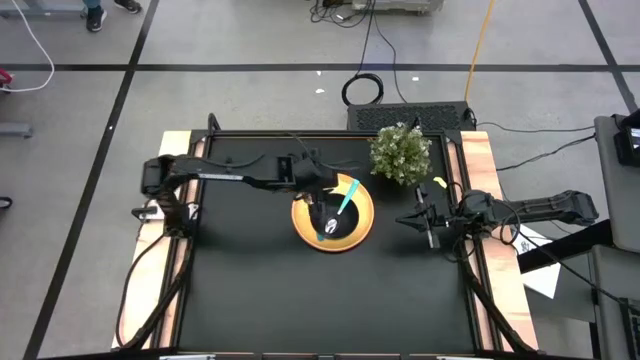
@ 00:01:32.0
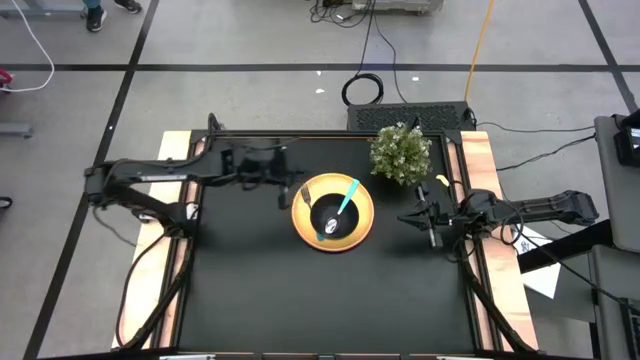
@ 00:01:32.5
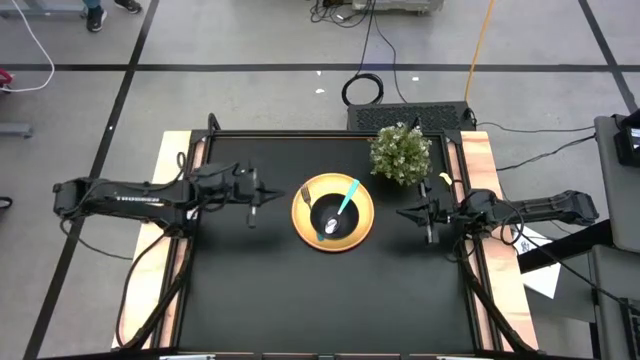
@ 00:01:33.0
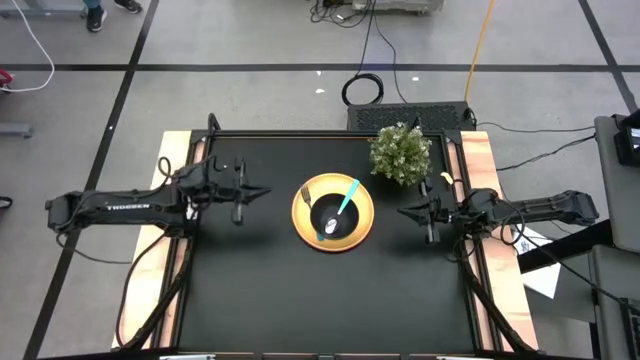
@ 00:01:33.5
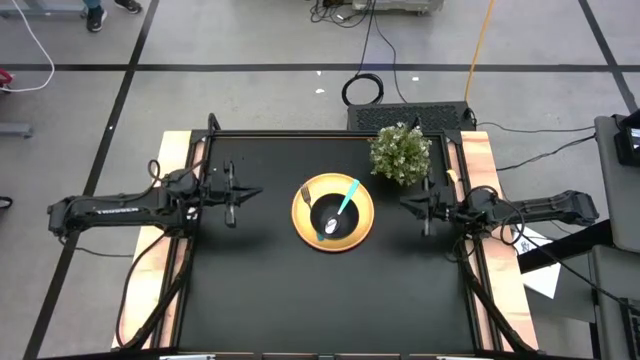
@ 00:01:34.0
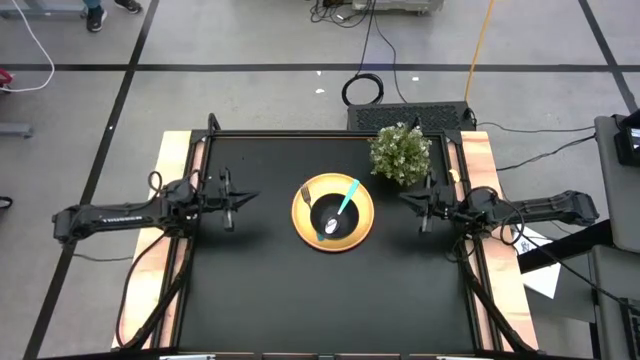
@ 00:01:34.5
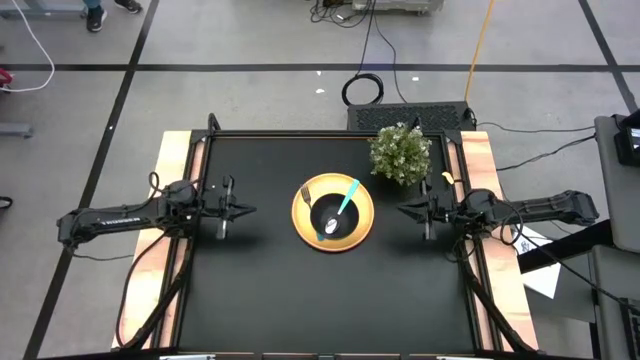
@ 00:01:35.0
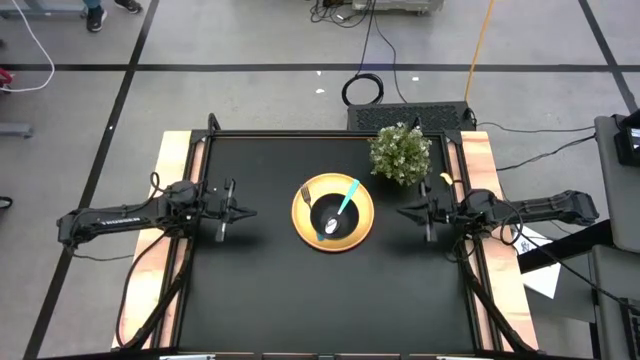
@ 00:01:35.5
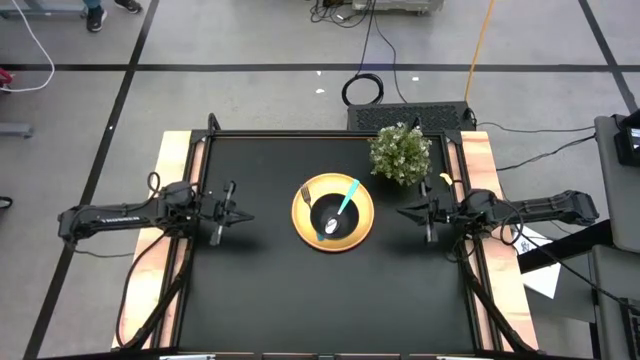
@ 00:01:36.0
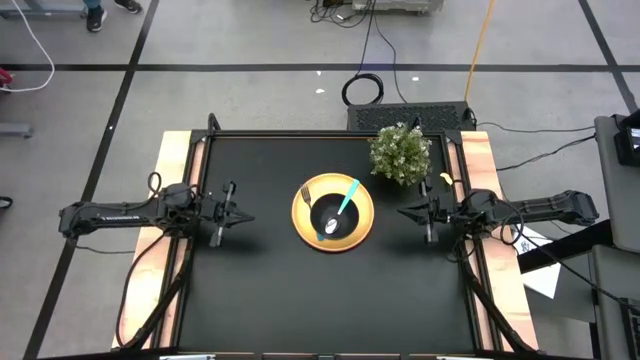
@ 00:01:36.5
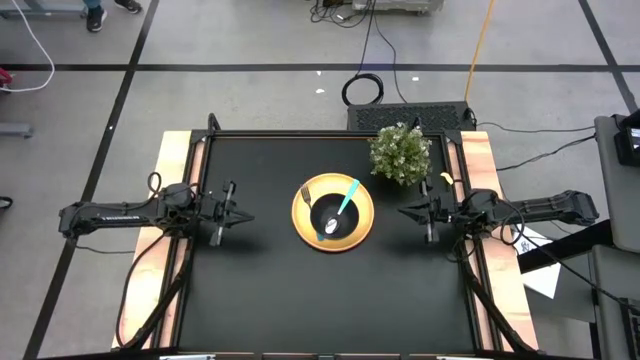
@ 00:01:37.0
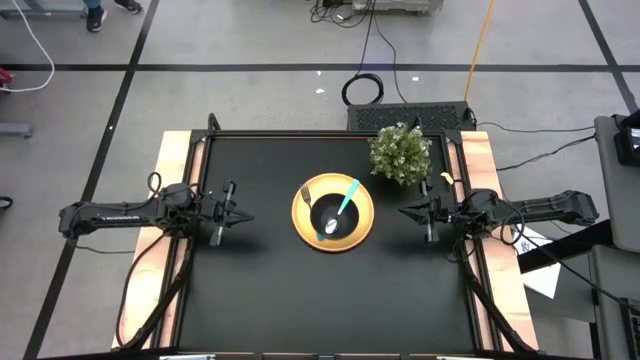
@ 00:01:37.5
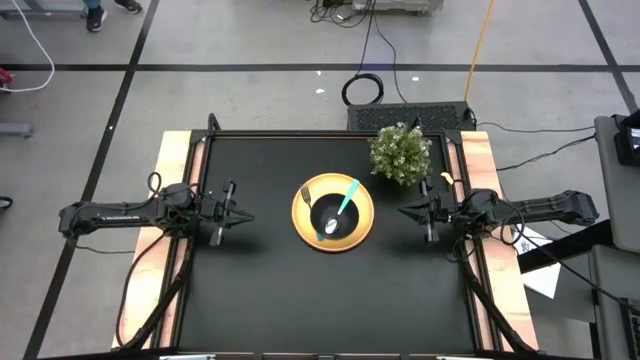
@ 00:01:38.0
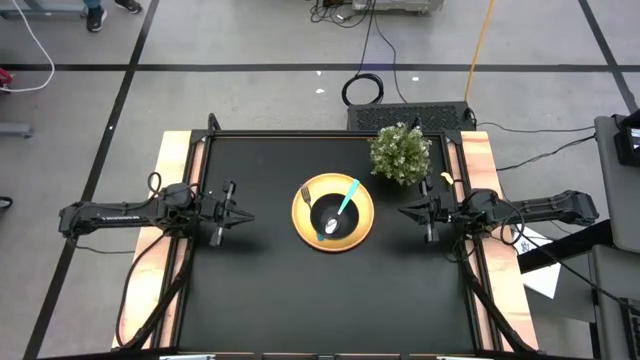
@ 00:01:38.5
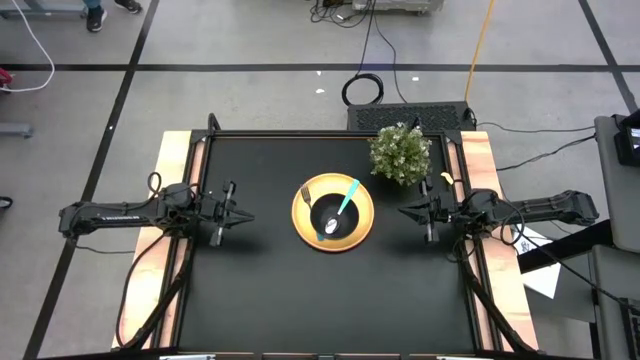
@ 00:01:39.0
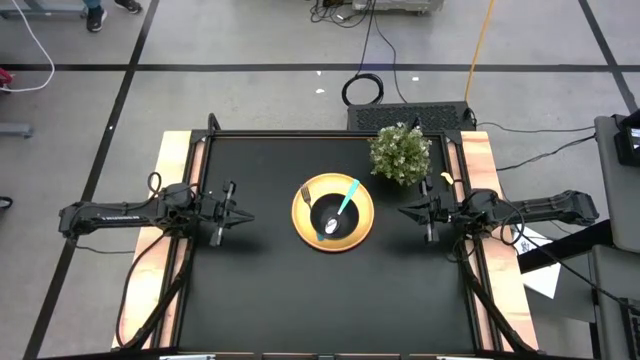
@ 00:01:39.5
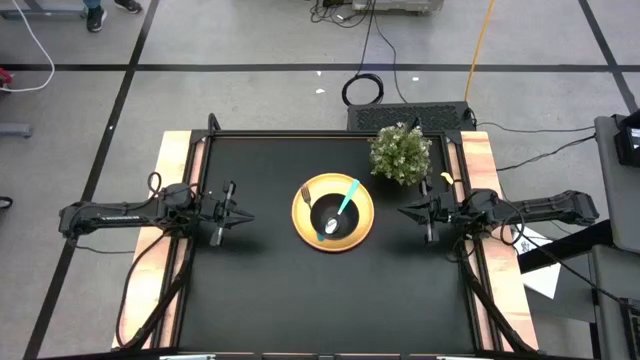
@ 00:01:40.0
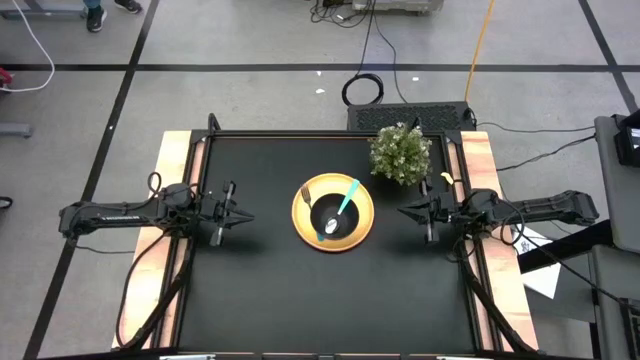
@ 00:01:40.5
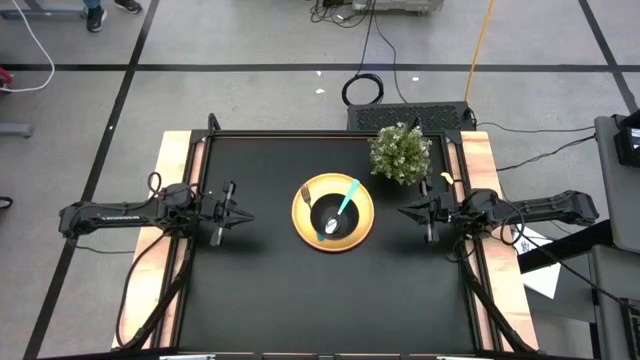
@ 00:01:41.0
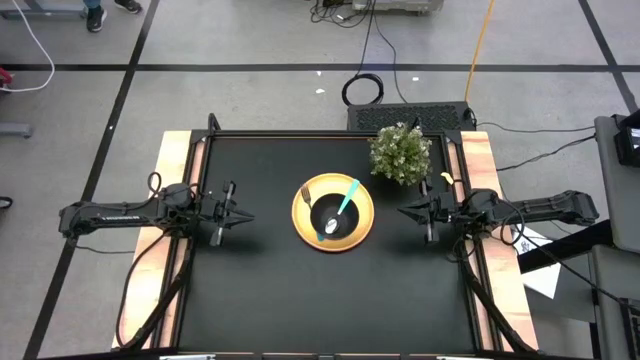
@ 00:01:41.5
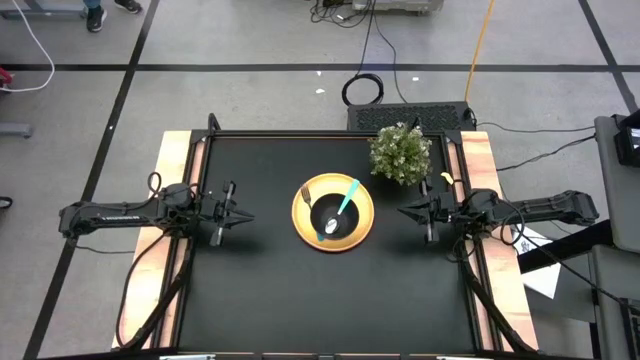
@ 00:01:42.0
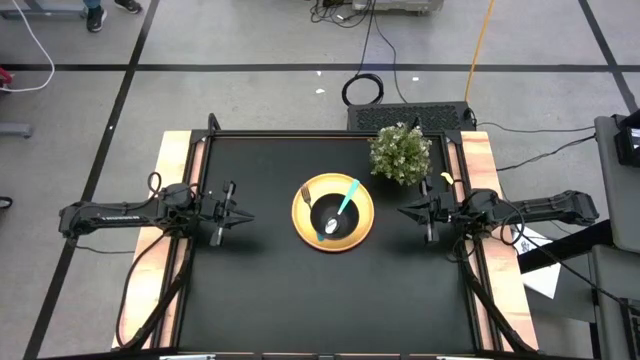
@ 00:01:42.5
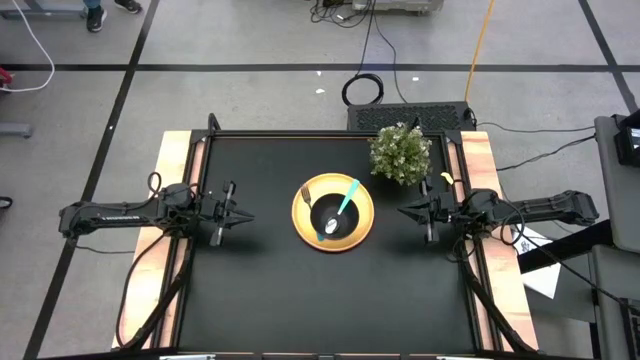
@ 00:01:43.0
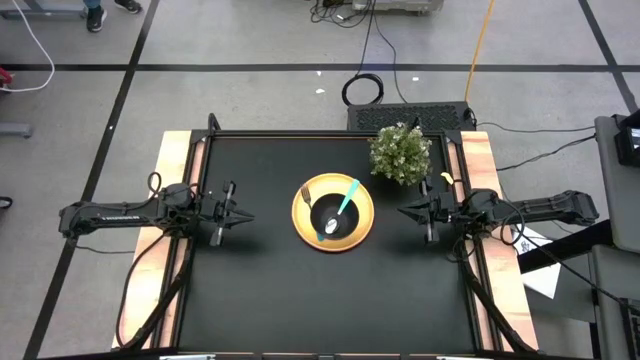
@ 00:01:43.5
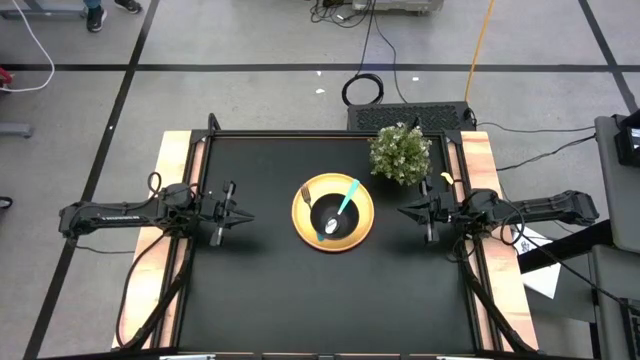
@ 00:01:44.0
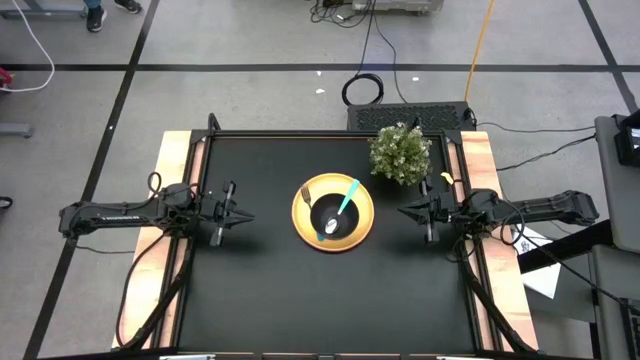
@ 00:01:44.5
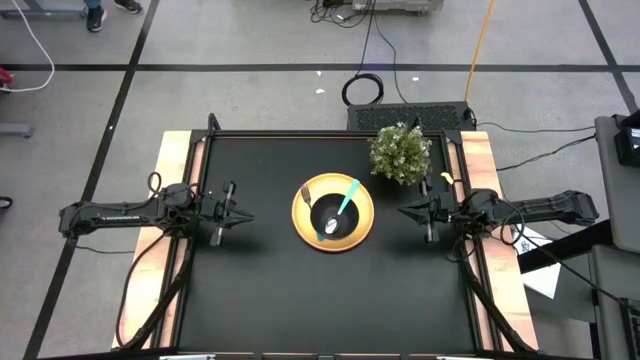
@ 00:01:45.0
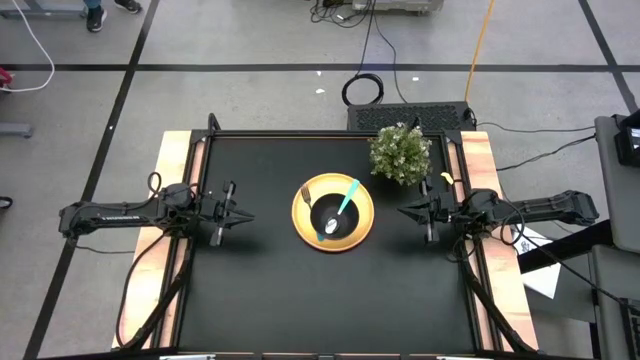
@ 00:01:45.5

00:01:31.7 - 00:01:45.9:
Task: Set table place
Return to Home Position

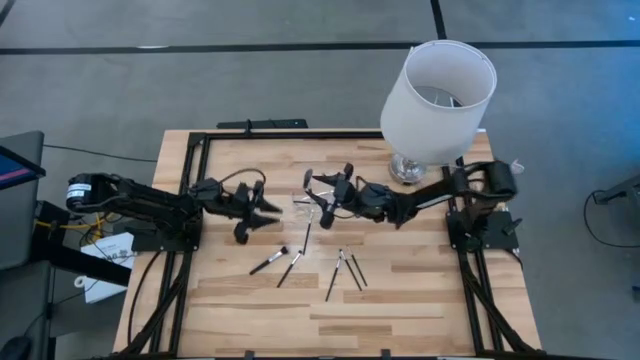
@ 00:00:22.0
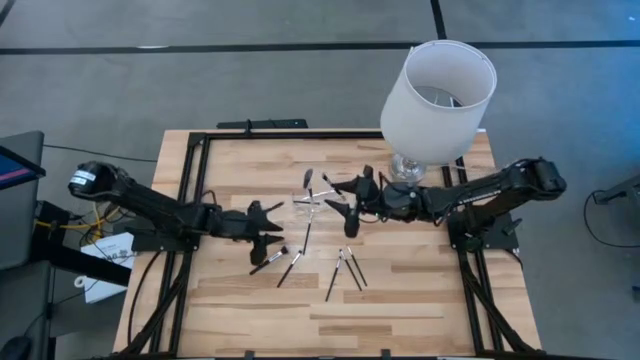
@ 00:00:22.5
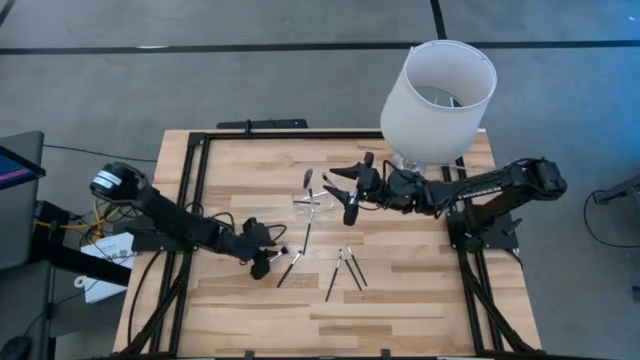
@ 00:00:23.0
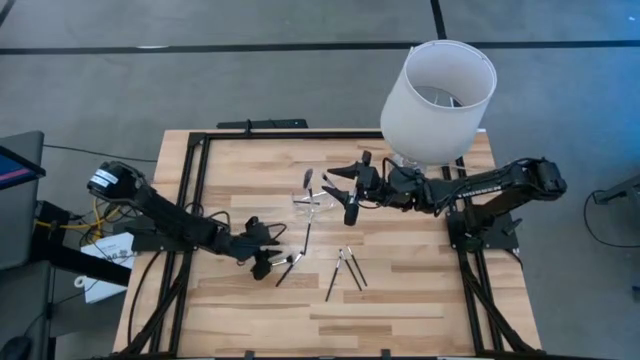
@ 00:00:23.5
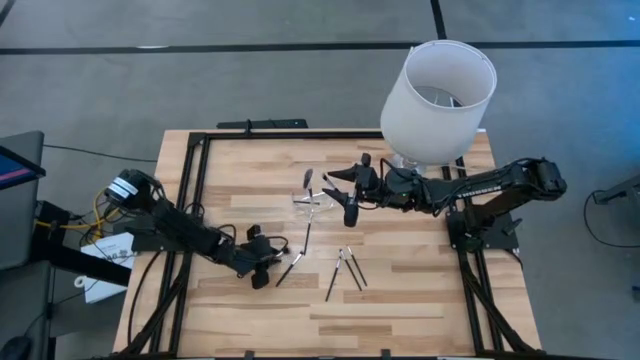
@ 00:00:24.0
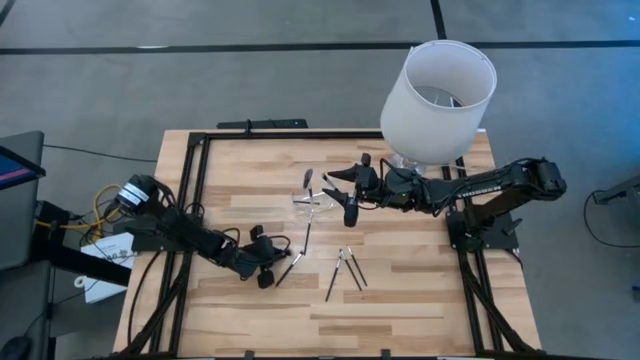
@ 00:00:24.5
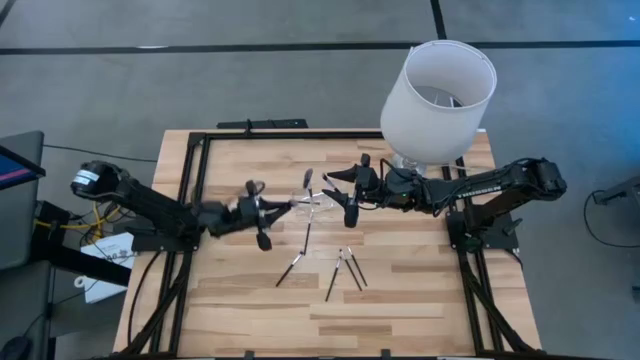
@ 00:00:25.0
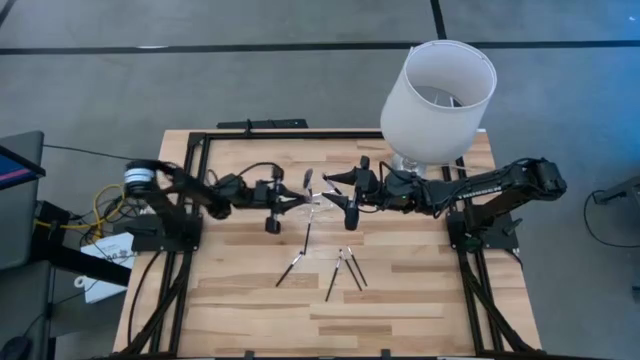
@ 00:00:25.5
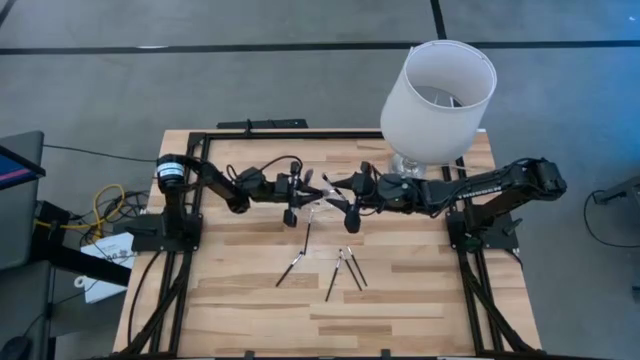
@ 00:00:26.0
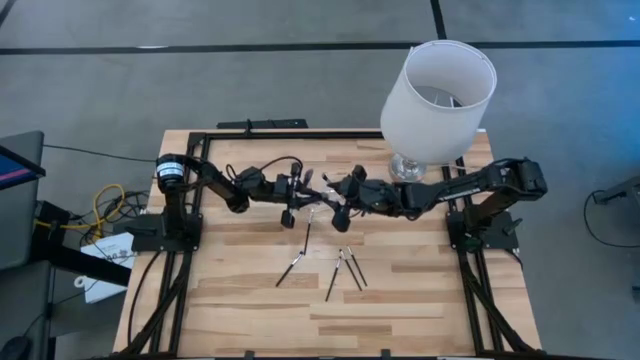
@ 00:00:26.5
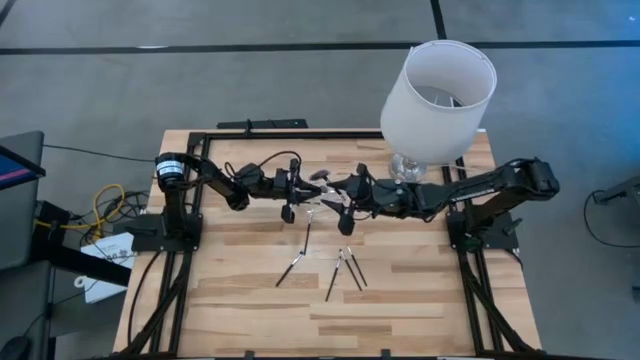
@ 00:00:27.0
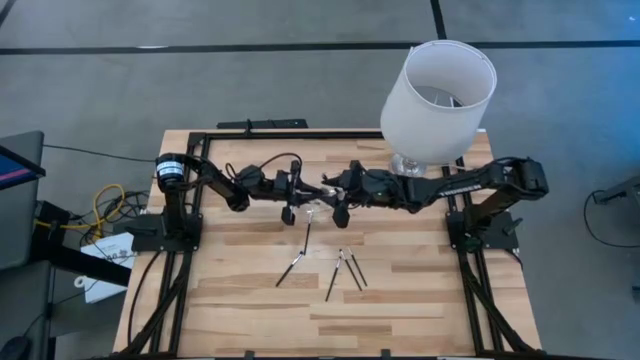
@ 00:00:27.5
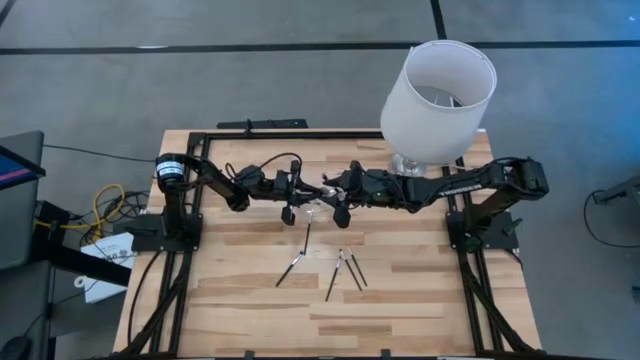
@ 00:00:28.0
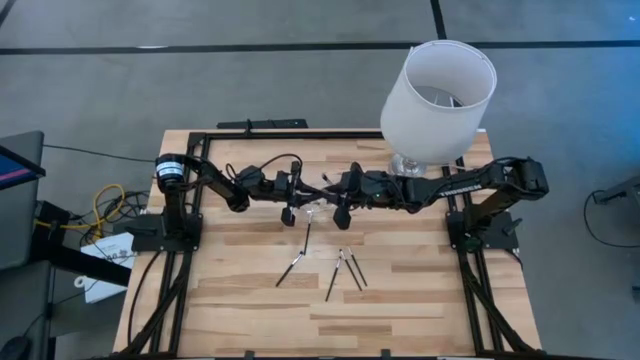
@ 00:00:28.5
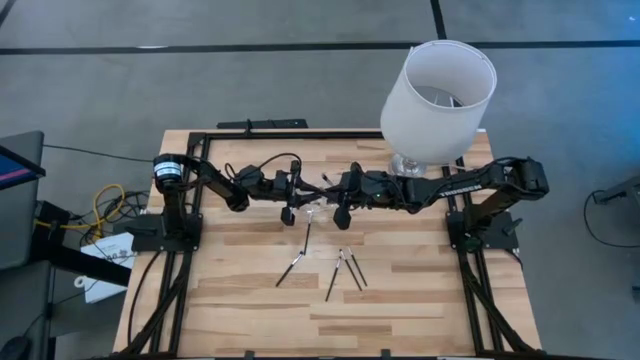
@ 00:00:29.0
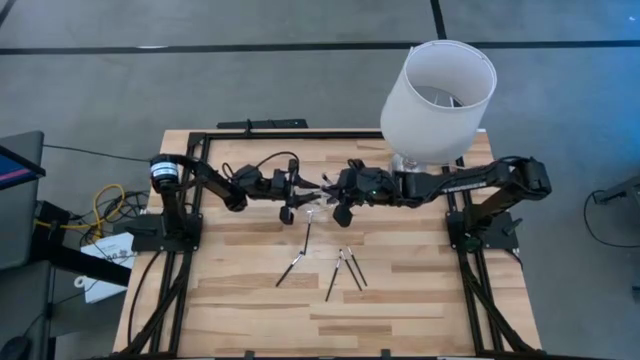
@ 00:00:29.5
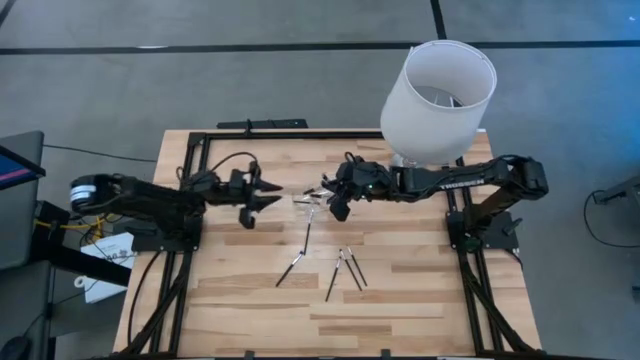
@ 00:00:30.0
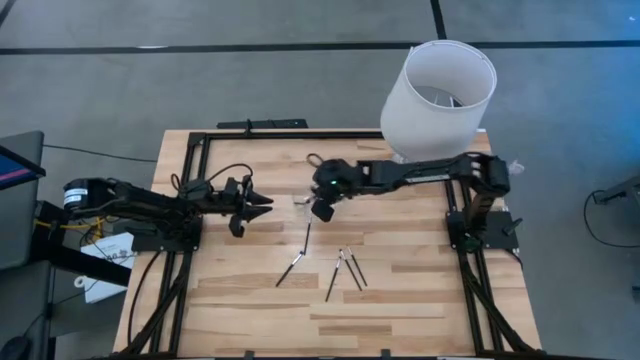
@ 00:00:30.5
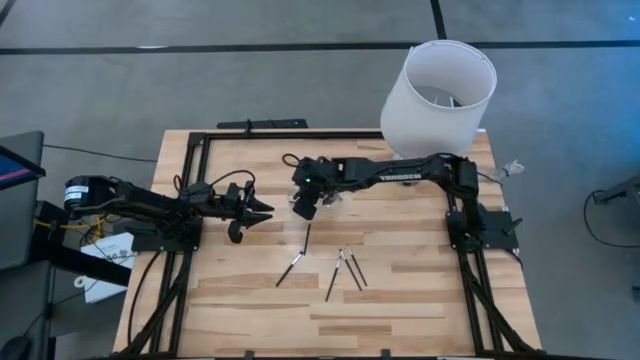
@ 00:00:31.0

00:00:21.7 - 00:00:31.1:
Task: Pick & Place Makeup Supplies
Put the black makeup brush into the transparent organizer
